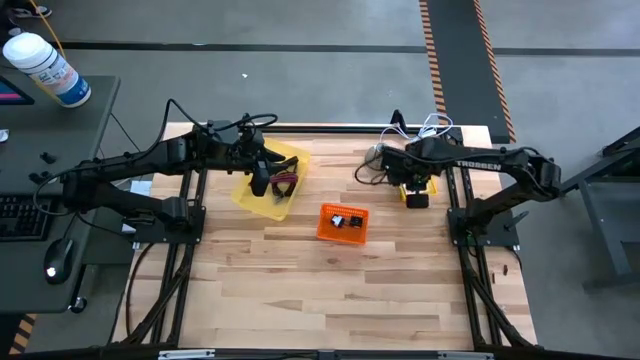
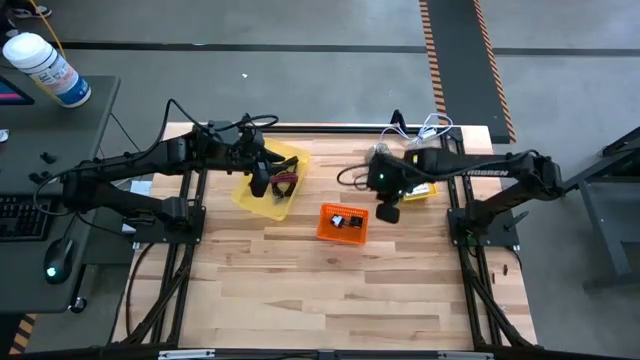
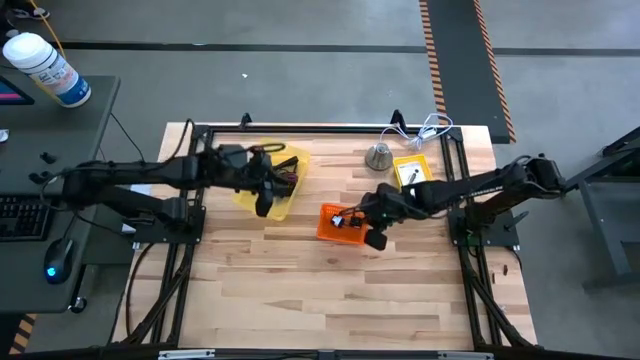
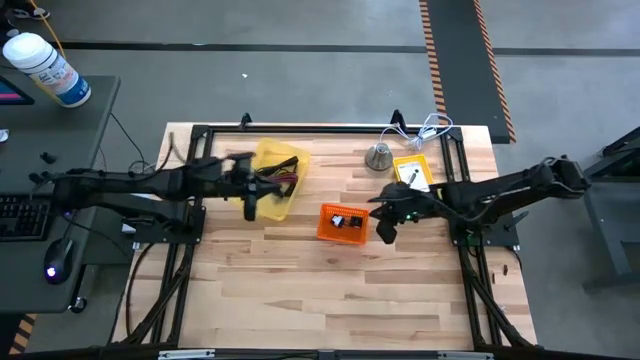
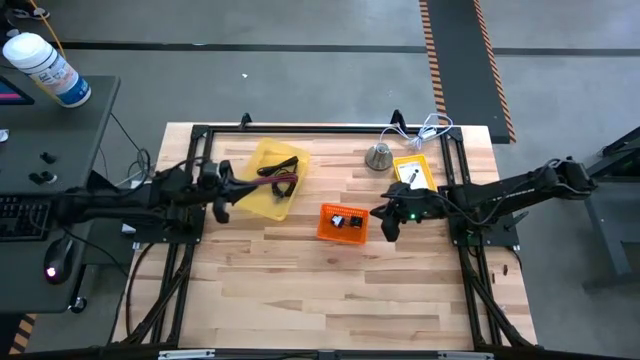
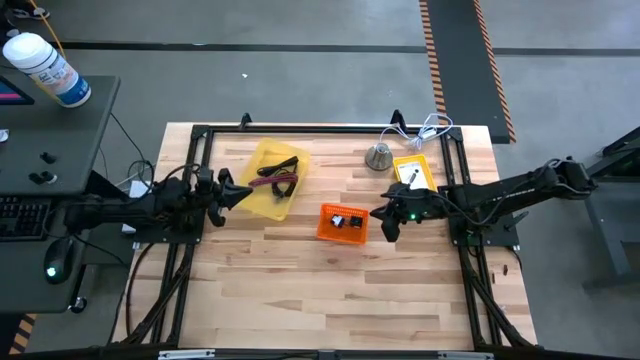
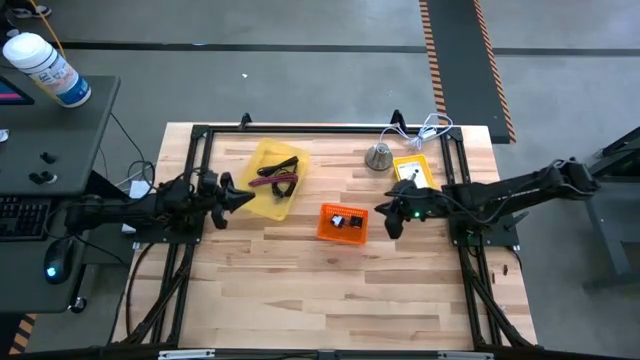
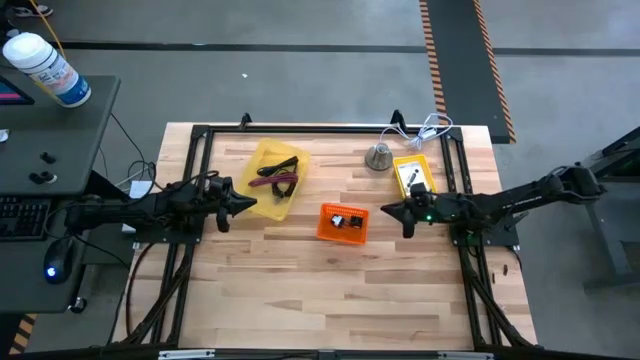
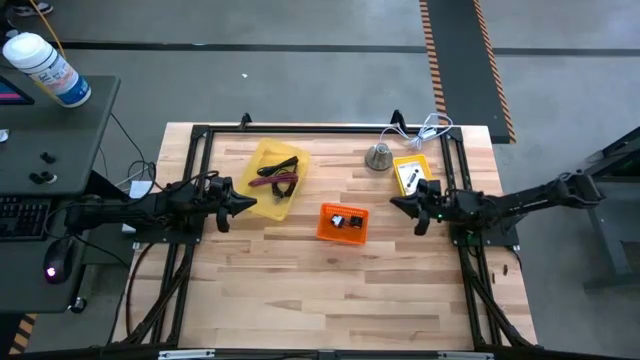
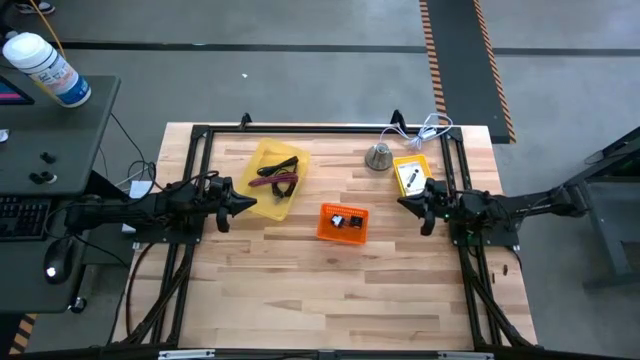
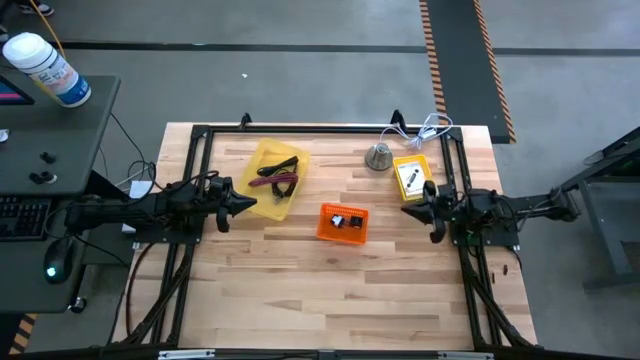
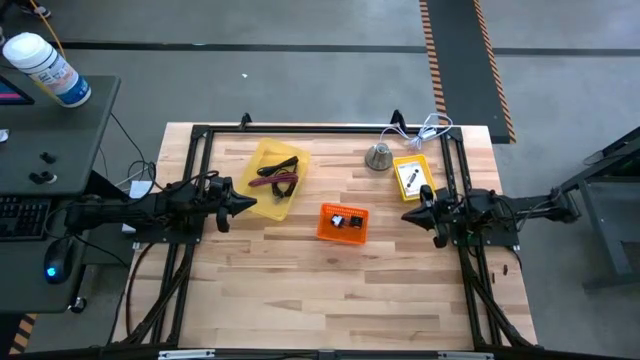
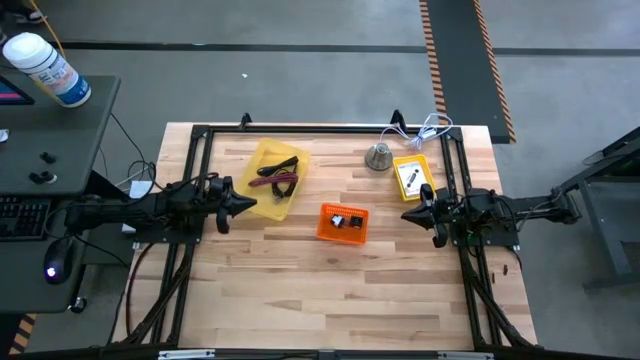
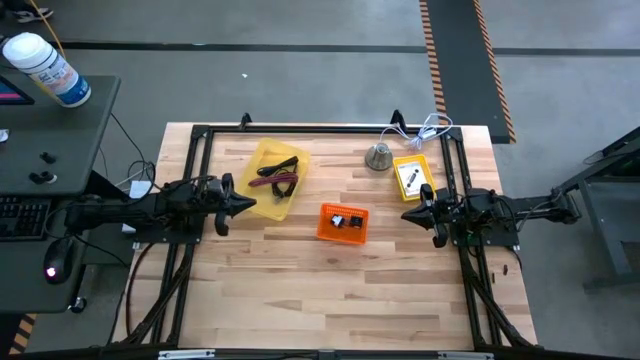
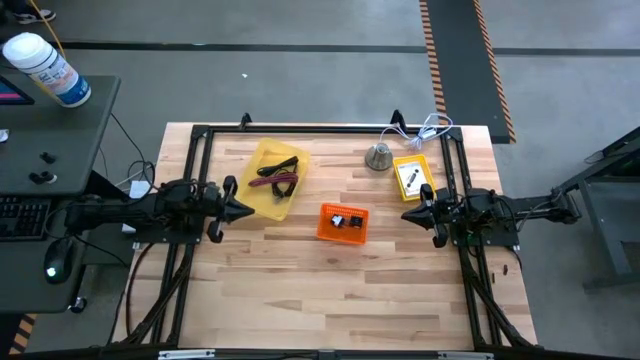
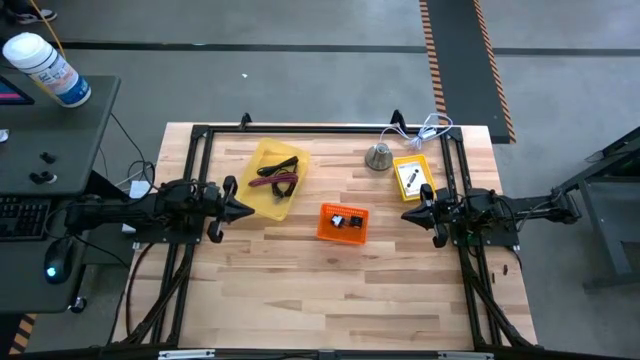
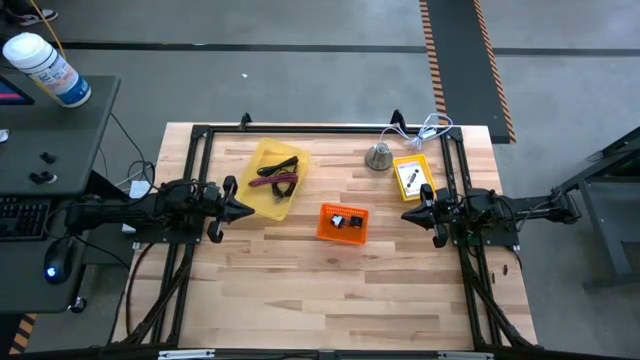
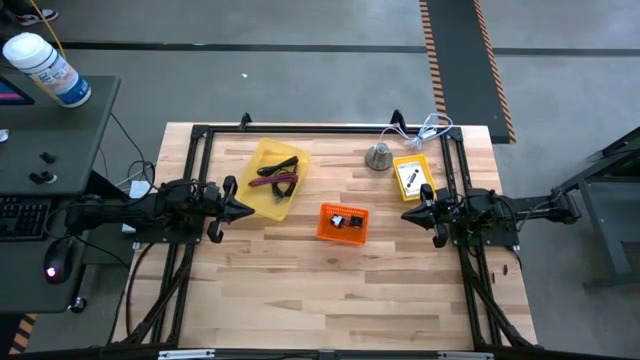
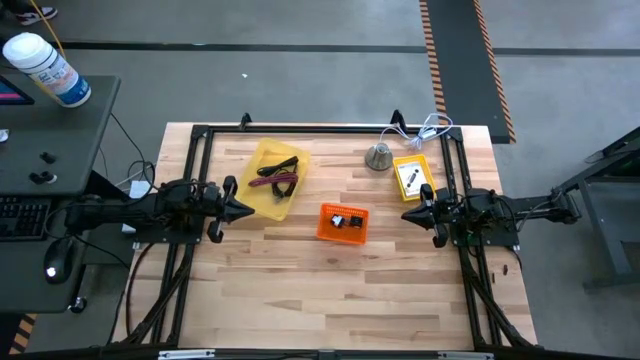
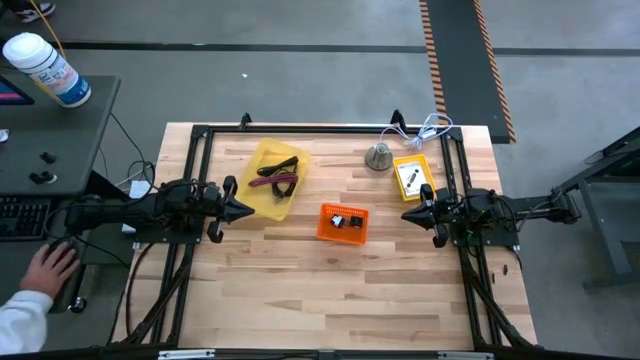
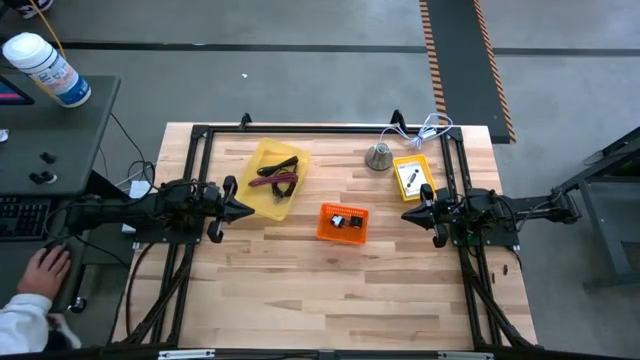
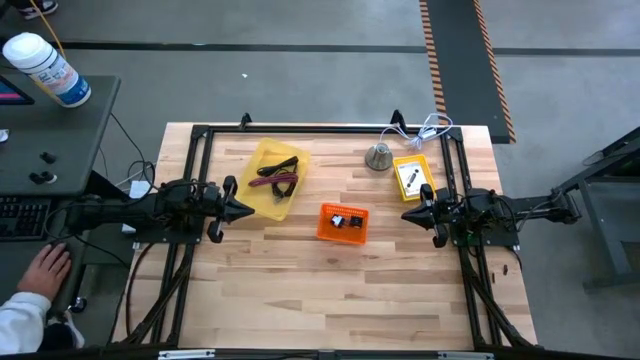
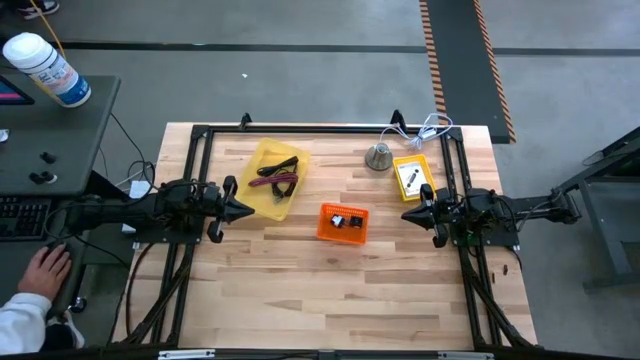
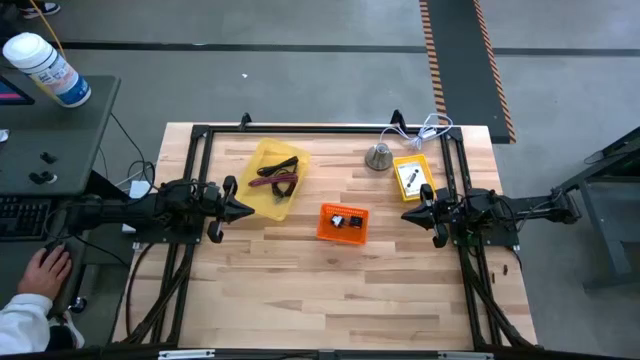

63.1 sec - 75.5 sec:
Task: Pick and place items into bin
Return to Home Position

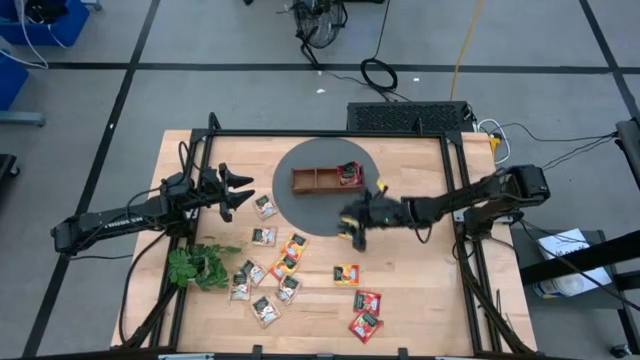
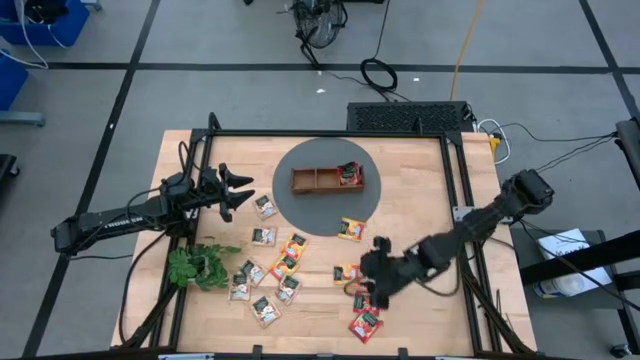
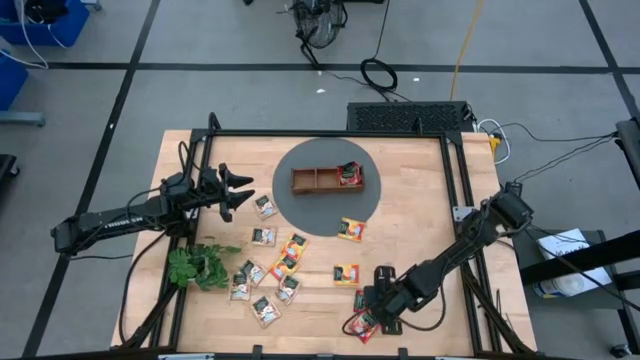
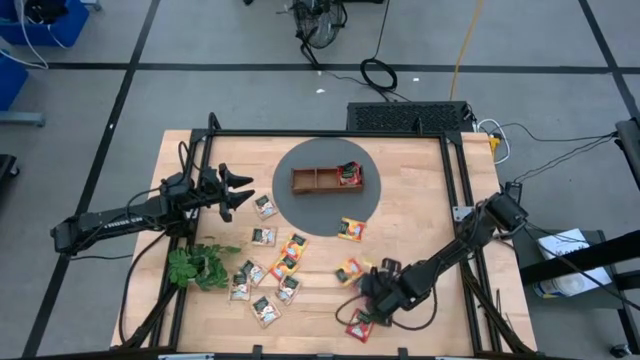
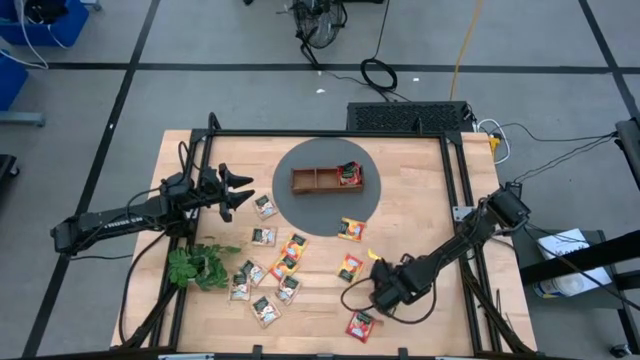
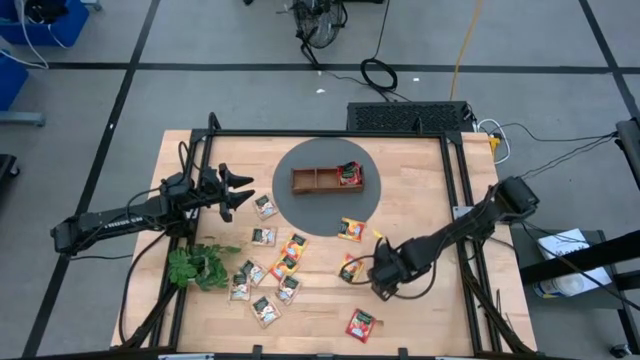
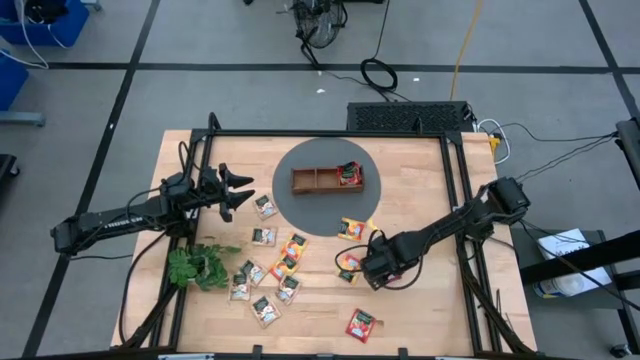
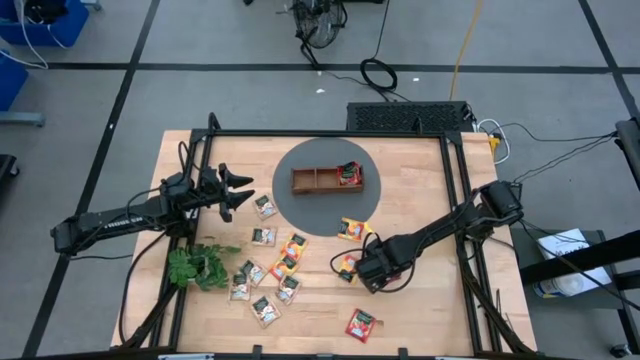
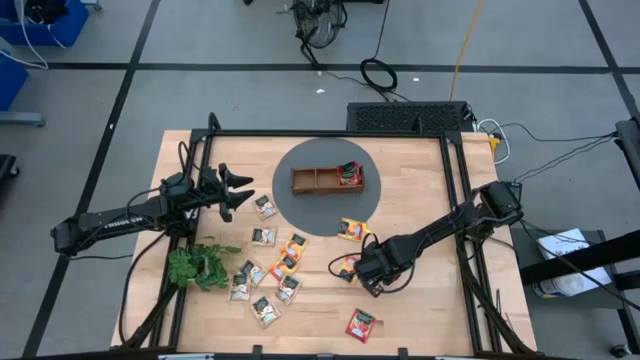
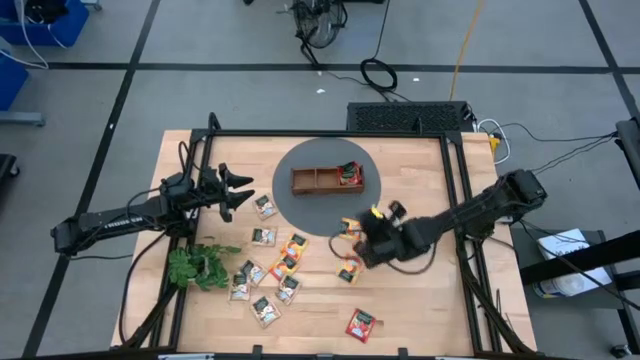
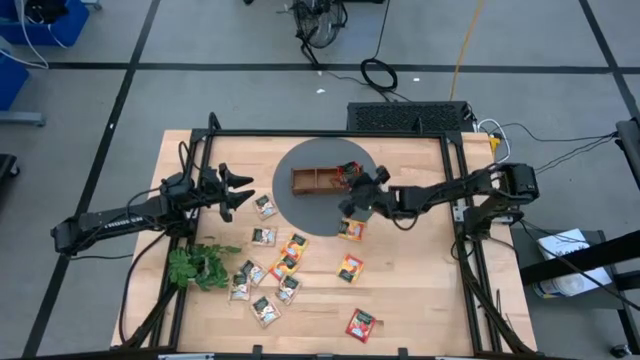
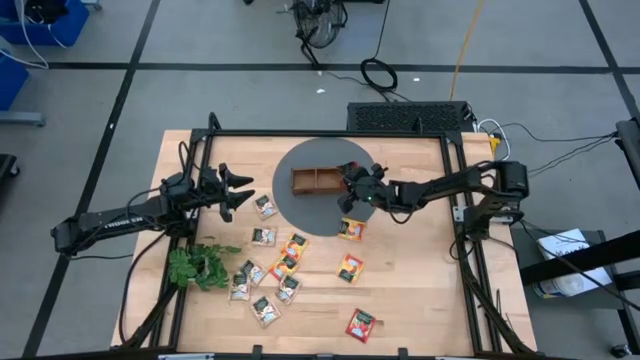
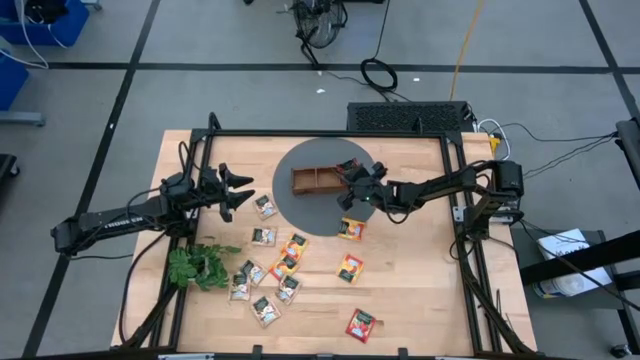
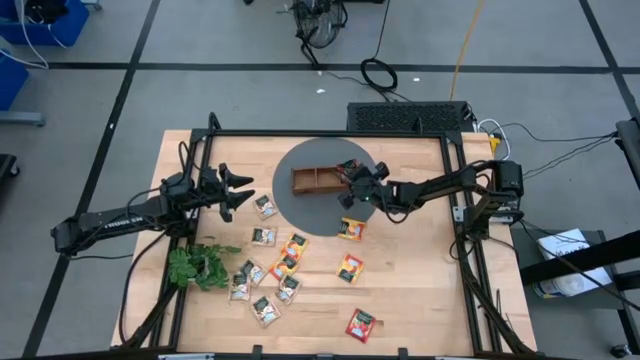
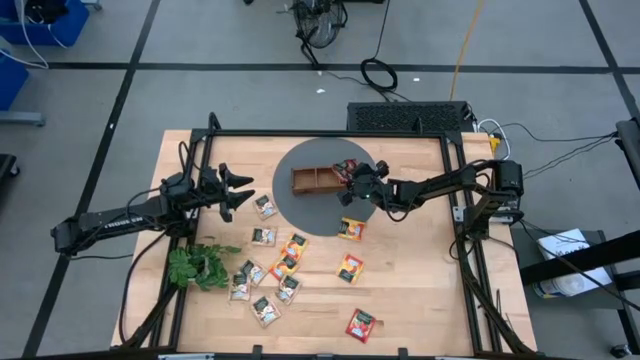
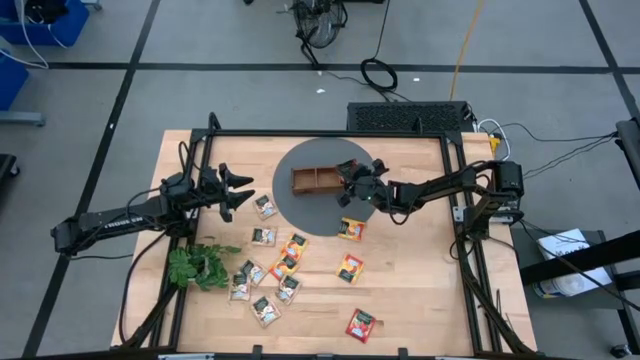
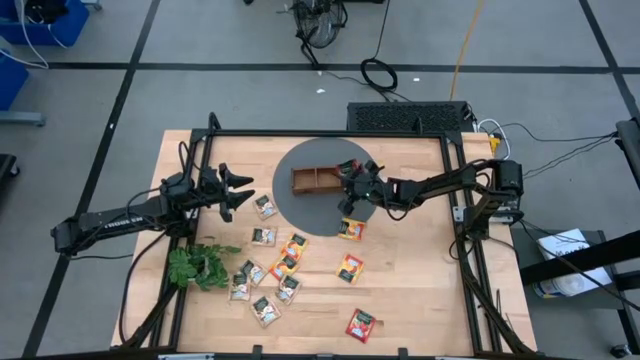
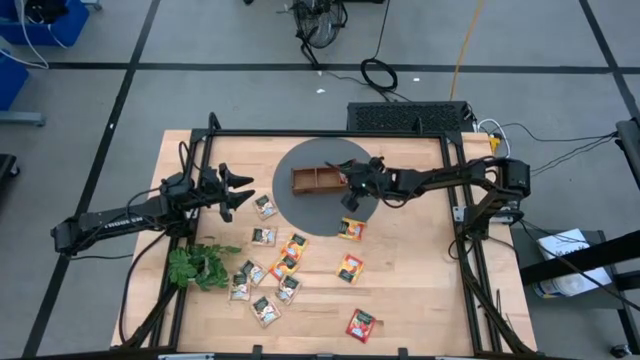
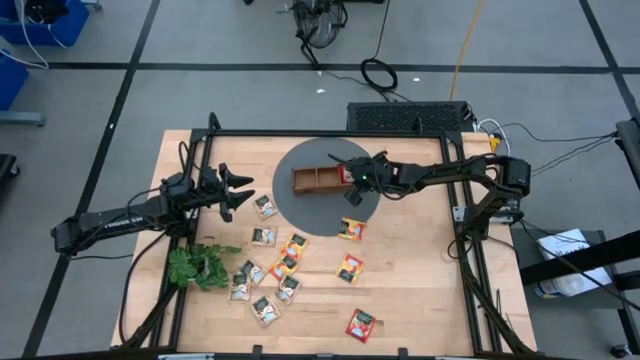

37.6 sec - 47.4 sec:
Task: Pick & Place Tea
Put the red tea bag into the right section of the wooden organizer
